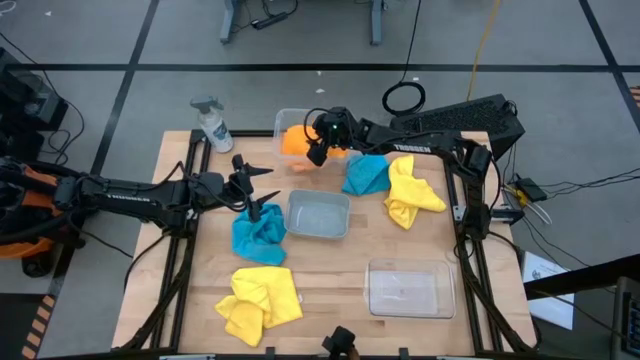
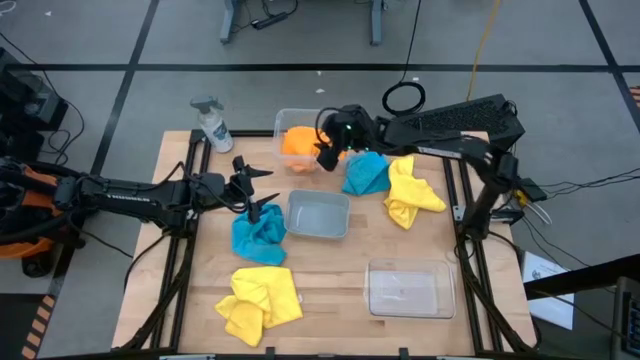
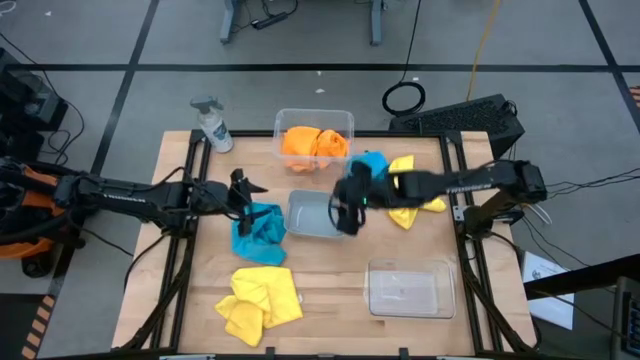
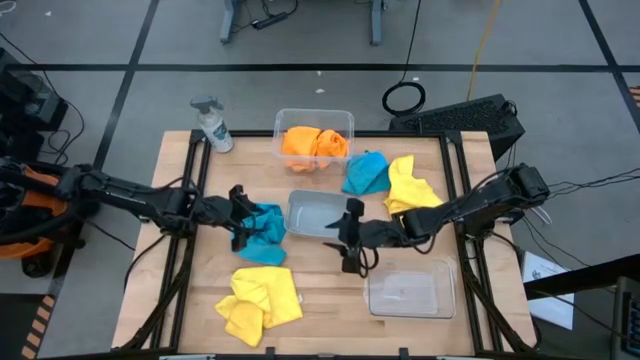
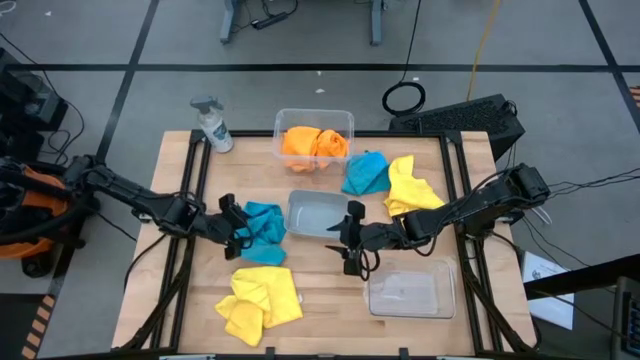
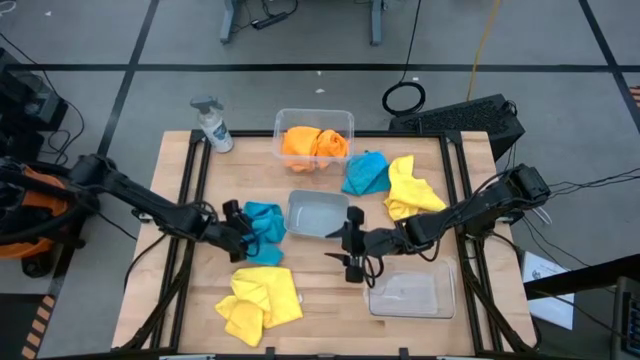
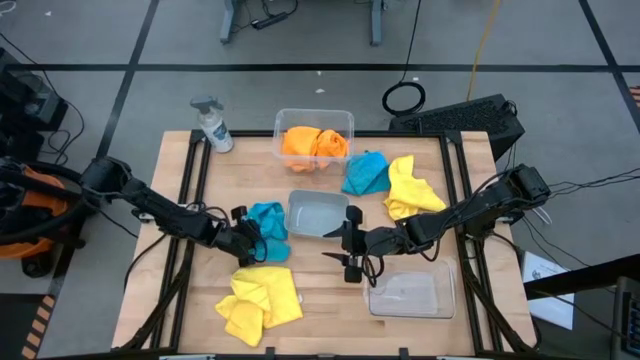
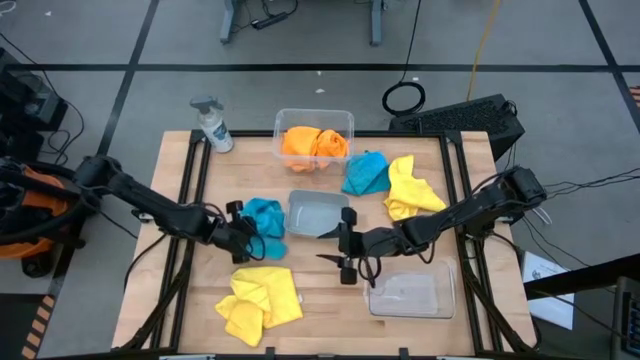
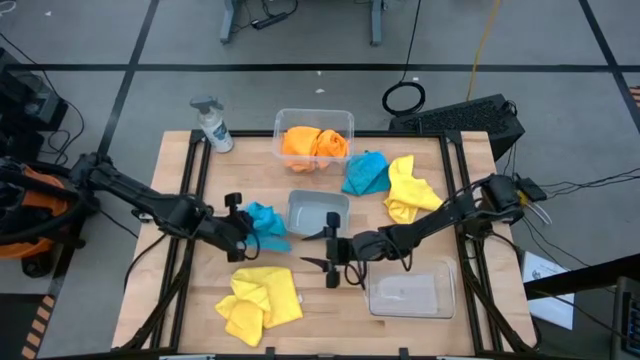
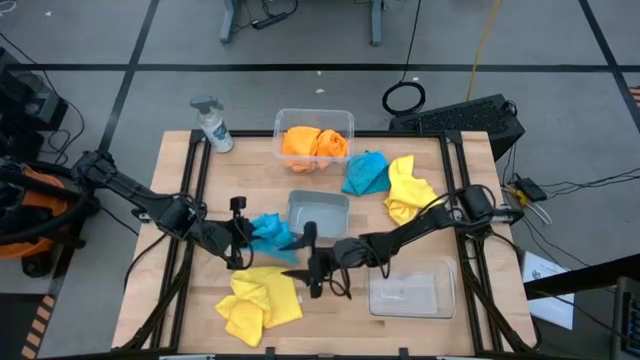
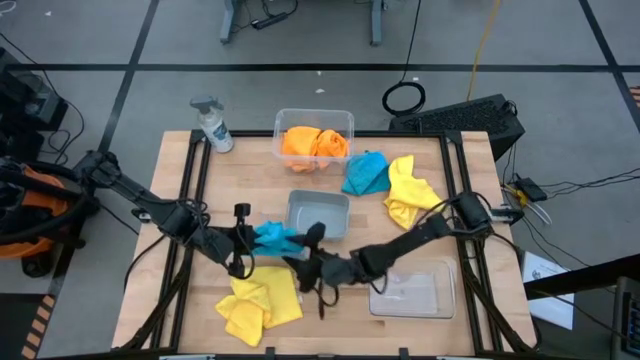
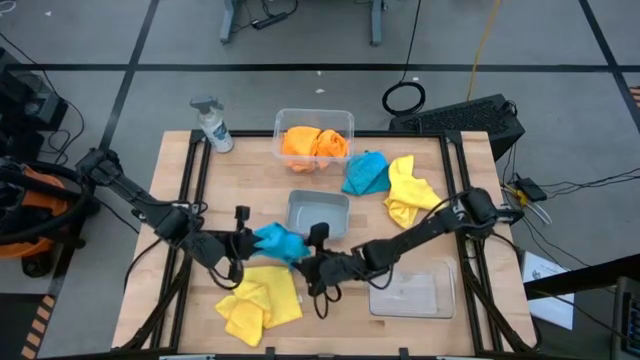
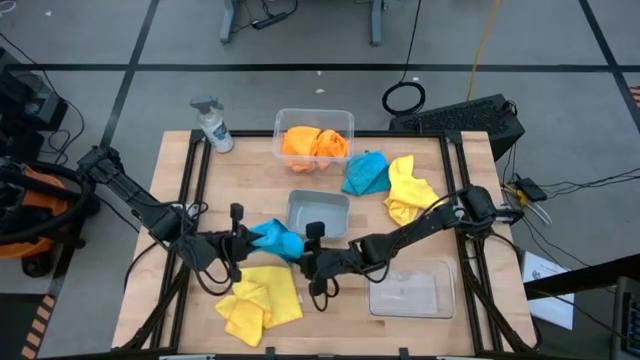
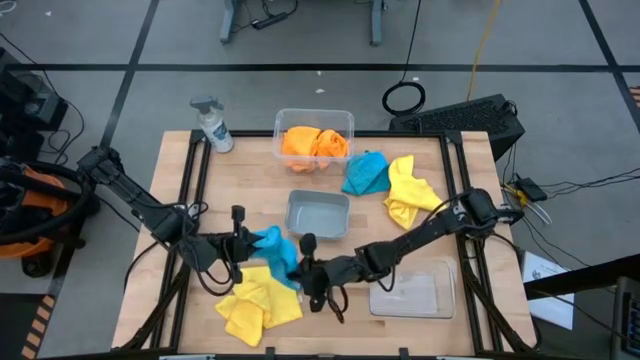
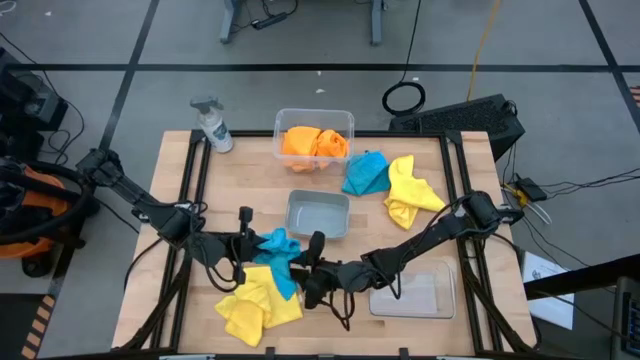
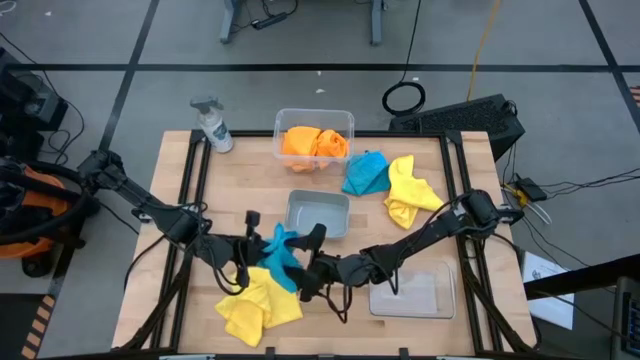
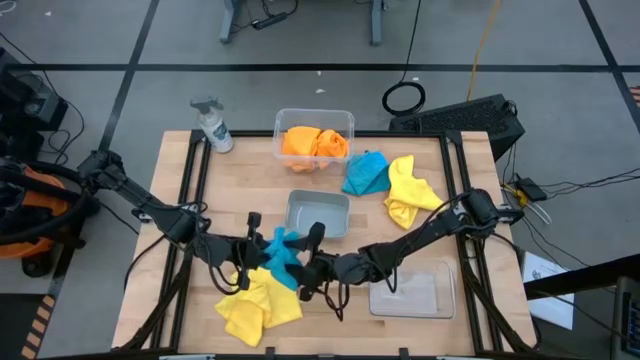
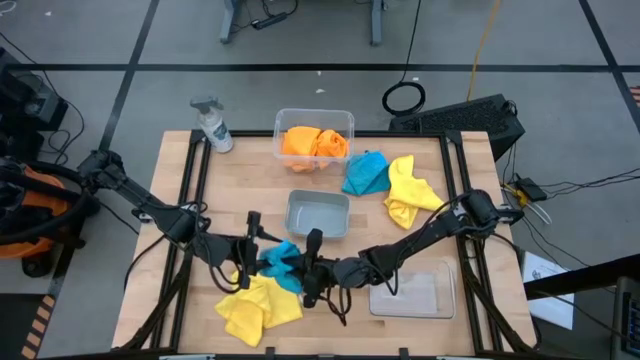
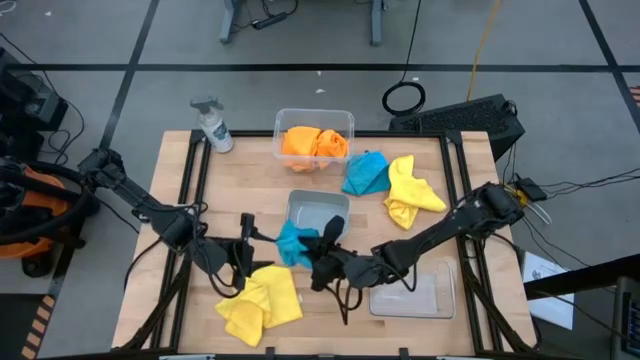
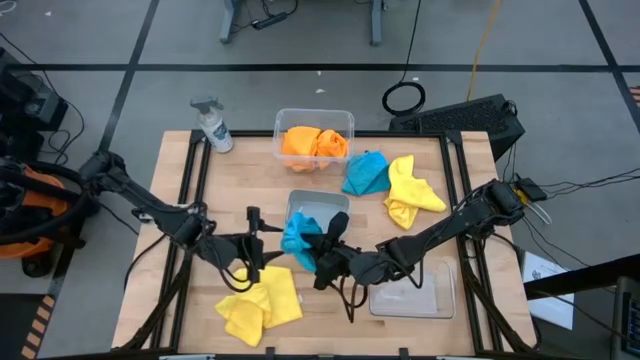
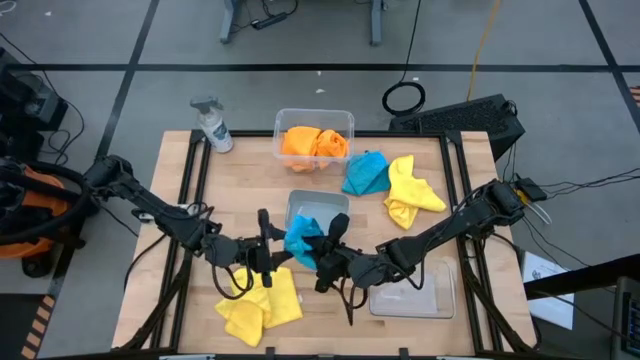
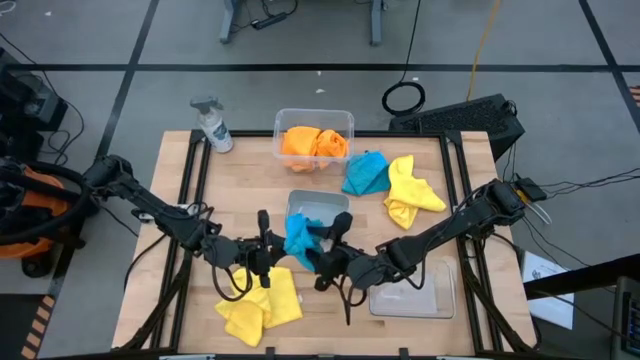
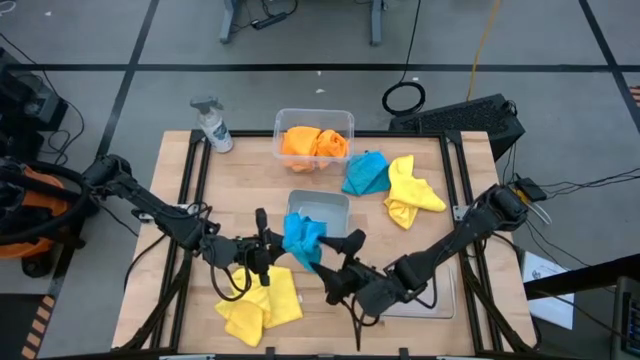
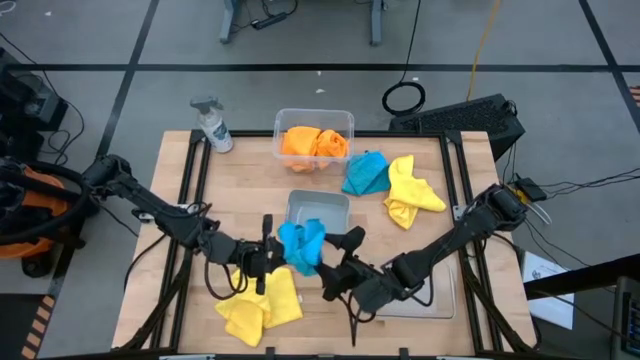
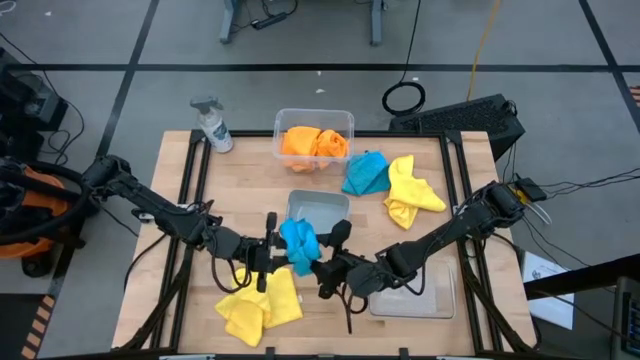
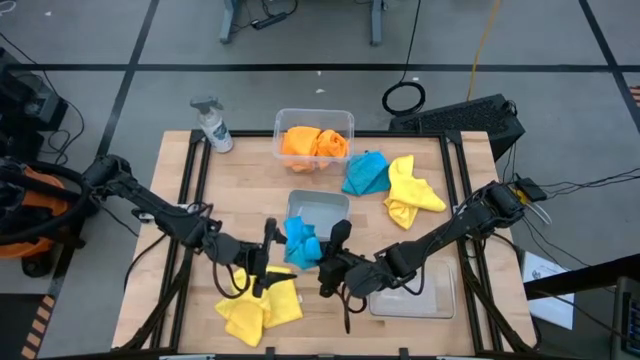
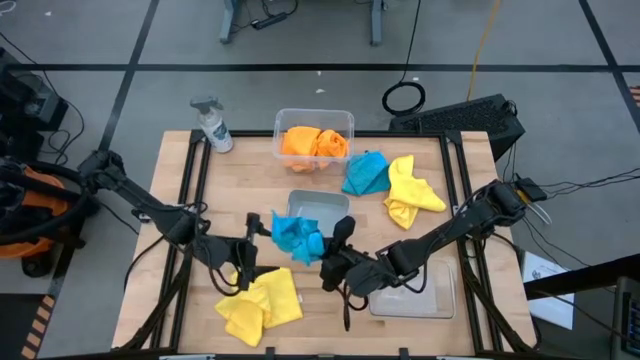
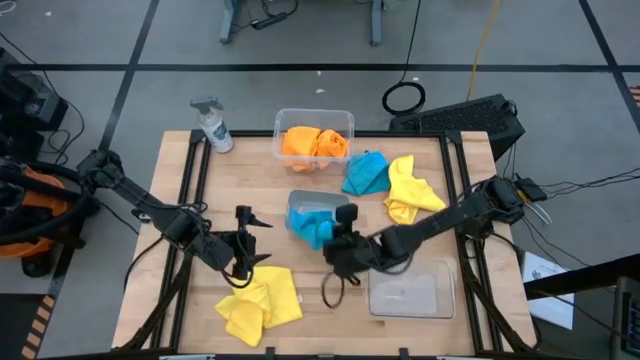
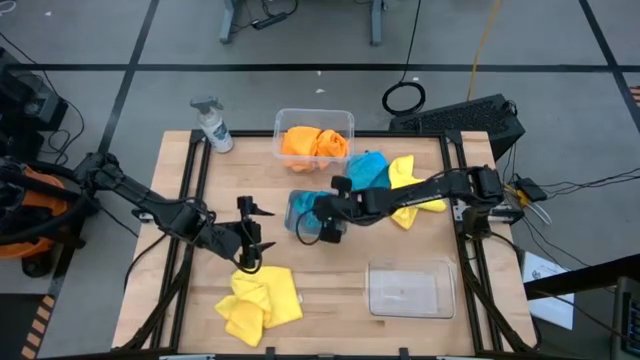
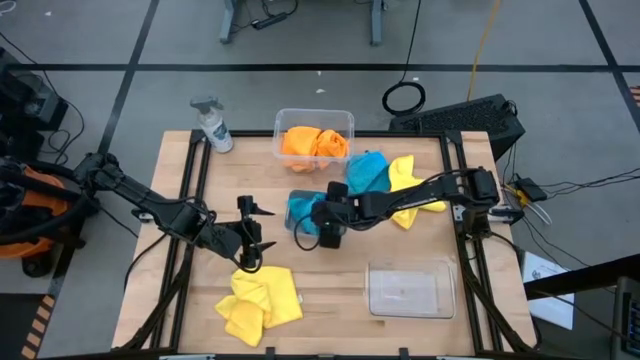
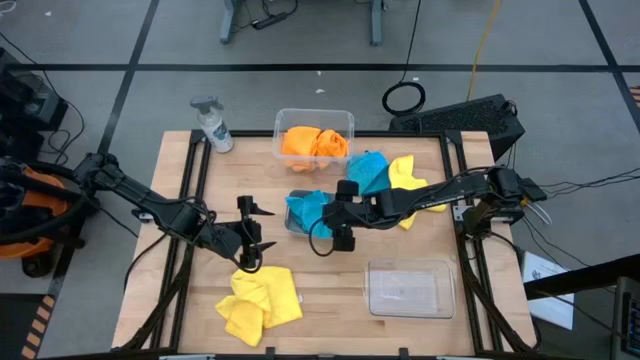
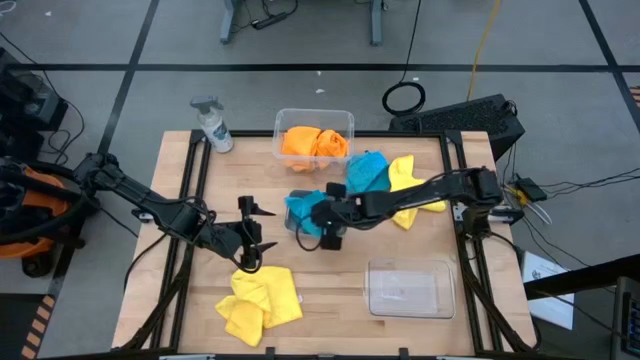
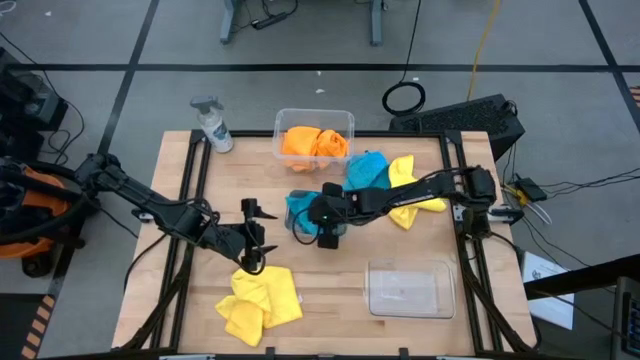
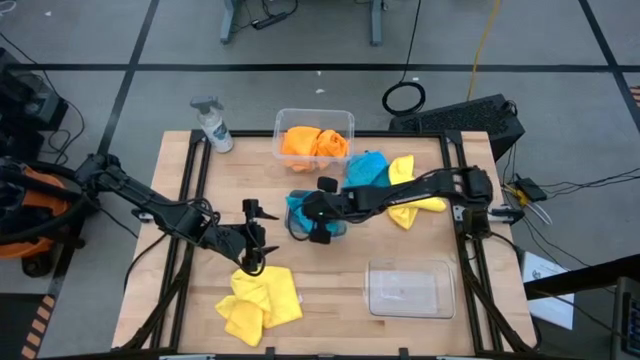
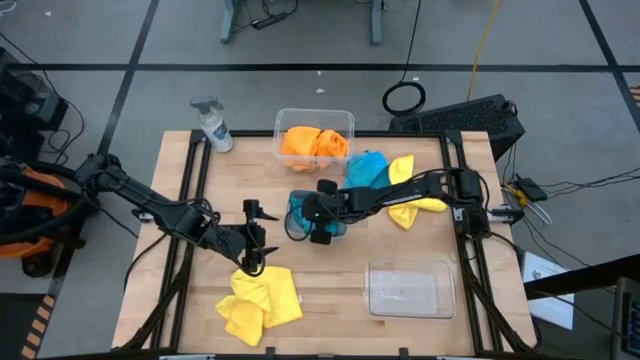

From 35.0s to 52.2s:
Task: Sort microfiber towel by color & place in baskets
Put the bottom blue microfiber towel into the grey bin
